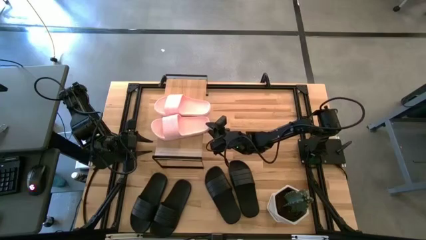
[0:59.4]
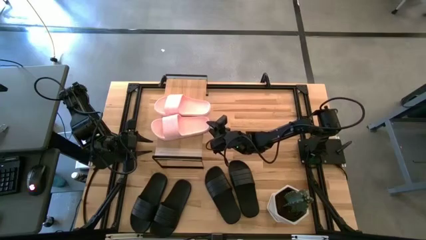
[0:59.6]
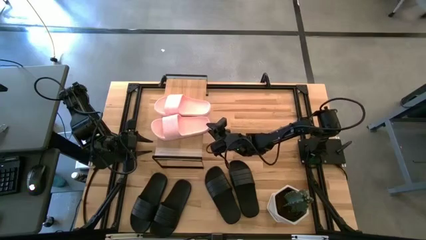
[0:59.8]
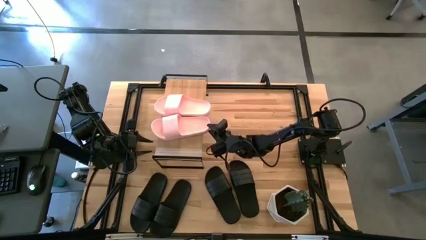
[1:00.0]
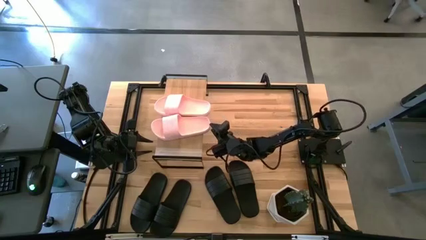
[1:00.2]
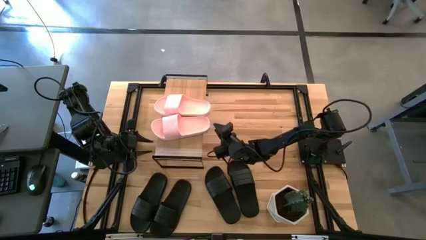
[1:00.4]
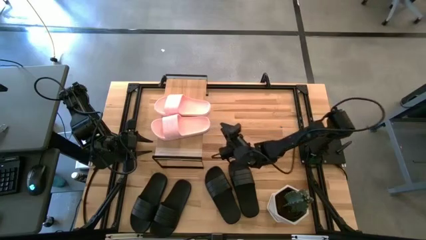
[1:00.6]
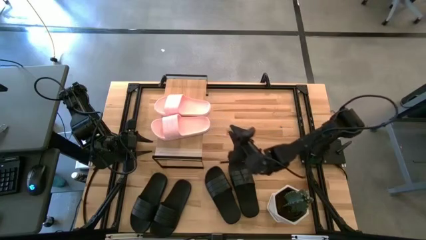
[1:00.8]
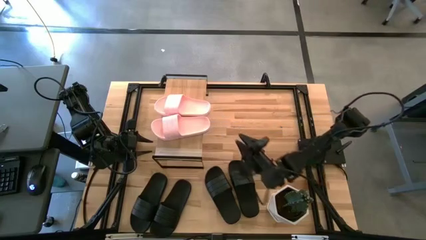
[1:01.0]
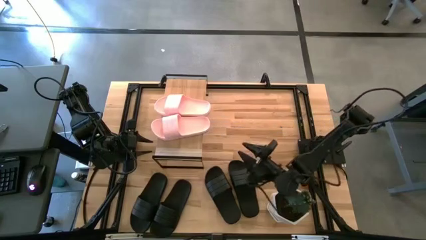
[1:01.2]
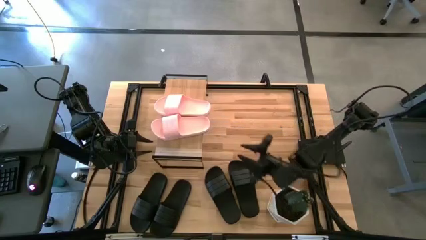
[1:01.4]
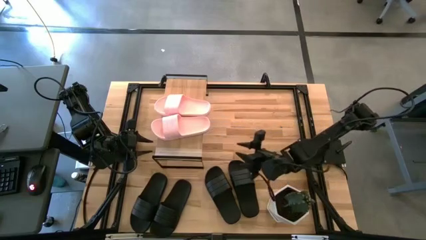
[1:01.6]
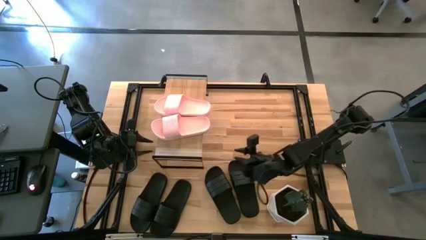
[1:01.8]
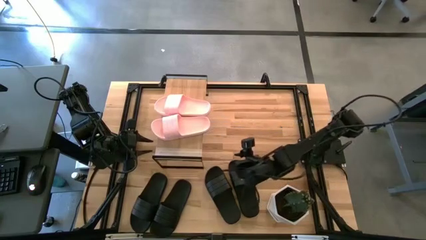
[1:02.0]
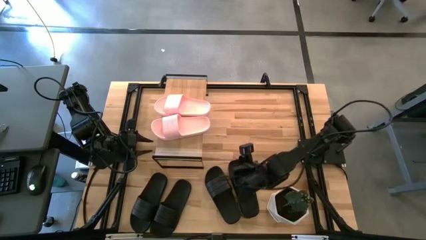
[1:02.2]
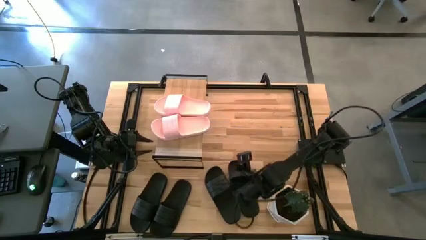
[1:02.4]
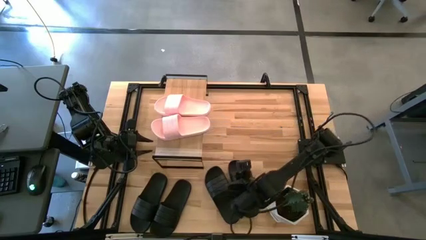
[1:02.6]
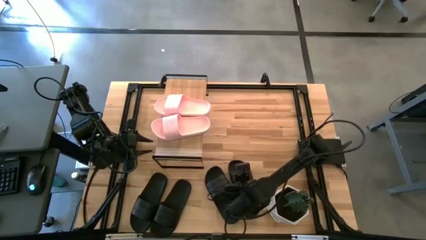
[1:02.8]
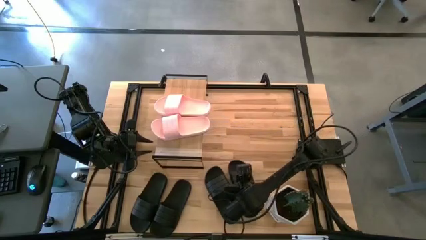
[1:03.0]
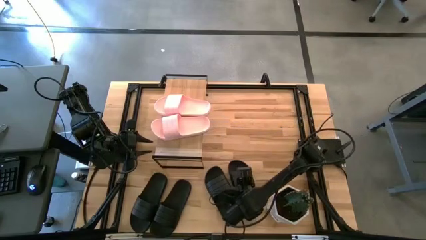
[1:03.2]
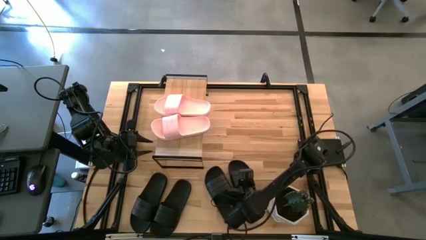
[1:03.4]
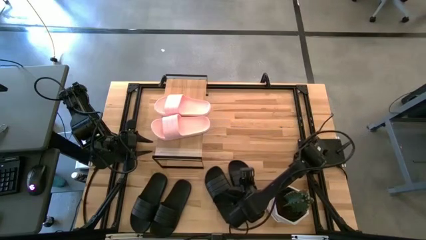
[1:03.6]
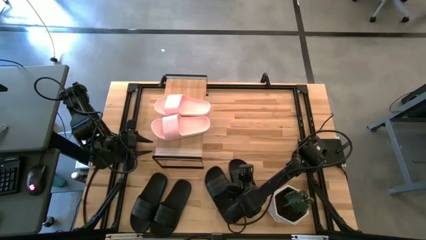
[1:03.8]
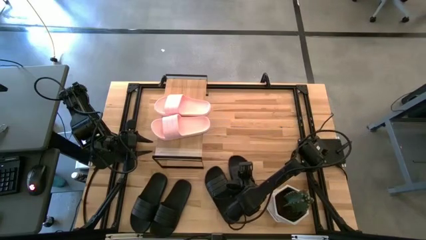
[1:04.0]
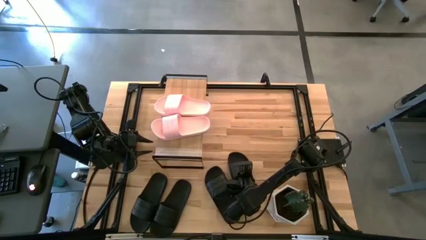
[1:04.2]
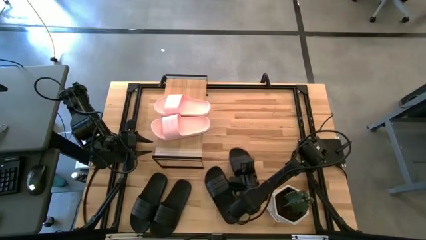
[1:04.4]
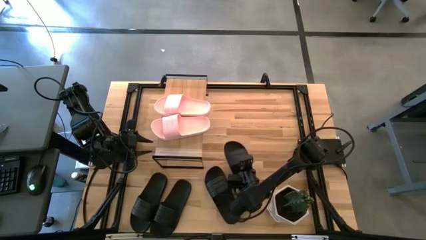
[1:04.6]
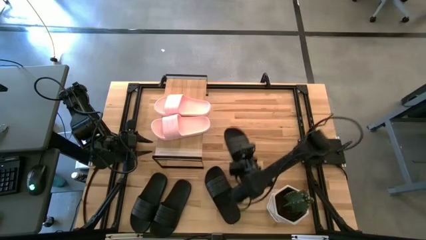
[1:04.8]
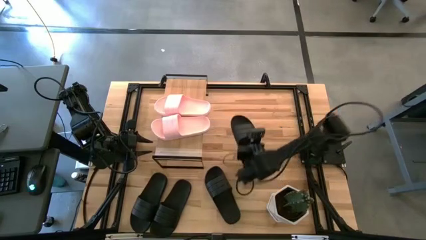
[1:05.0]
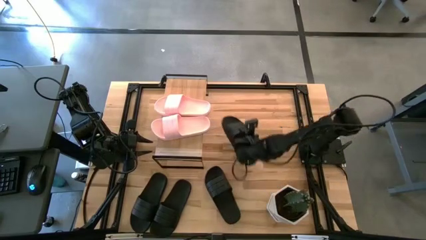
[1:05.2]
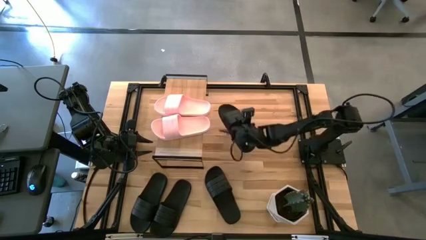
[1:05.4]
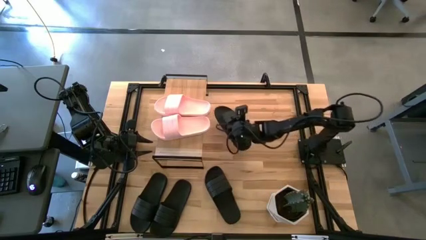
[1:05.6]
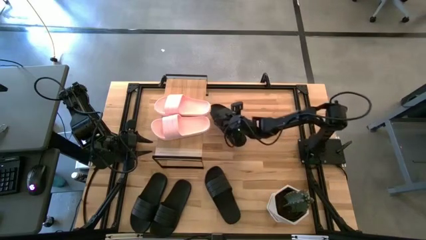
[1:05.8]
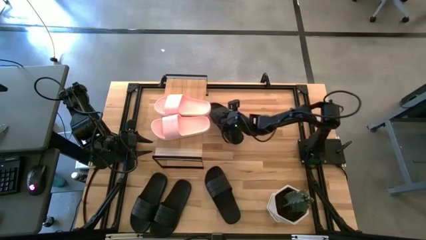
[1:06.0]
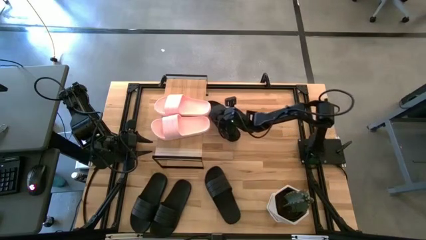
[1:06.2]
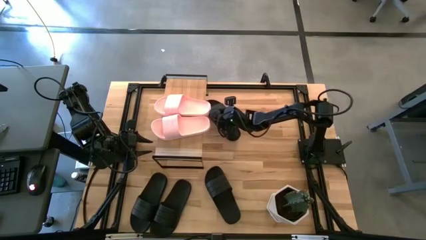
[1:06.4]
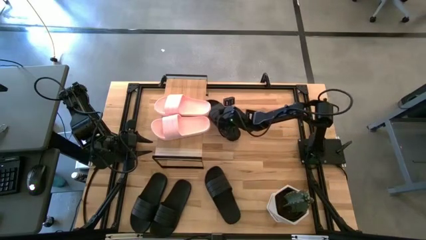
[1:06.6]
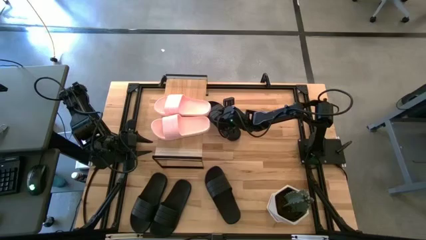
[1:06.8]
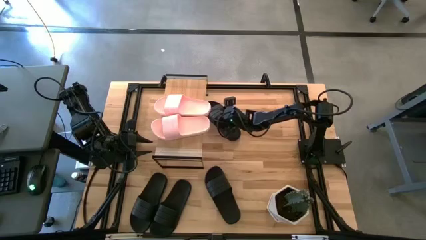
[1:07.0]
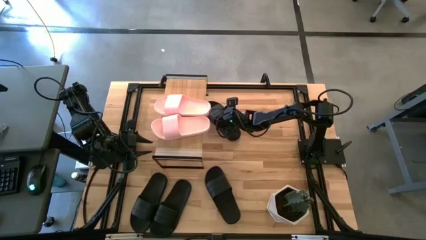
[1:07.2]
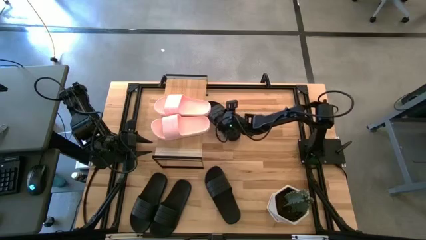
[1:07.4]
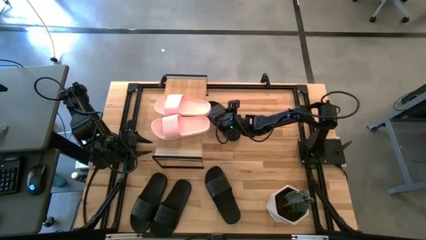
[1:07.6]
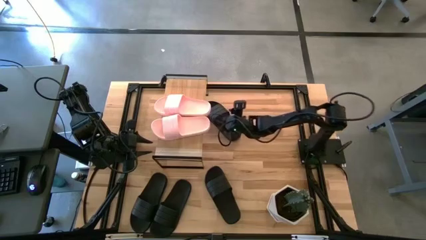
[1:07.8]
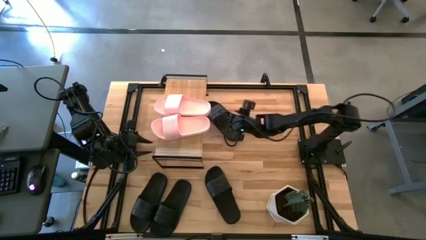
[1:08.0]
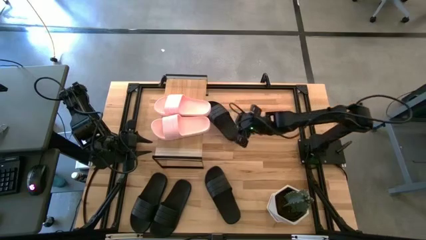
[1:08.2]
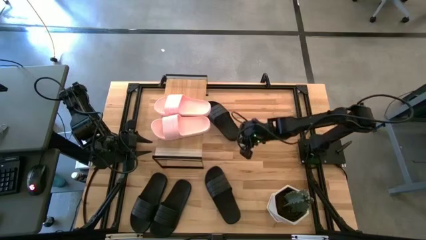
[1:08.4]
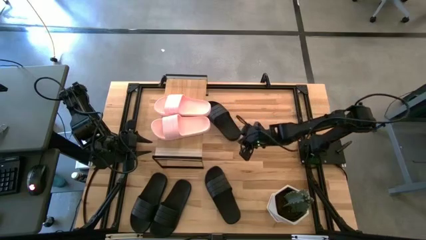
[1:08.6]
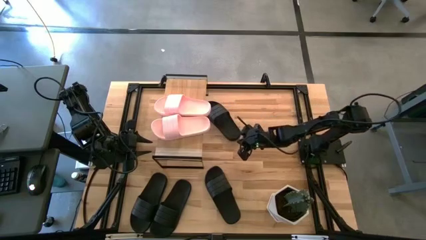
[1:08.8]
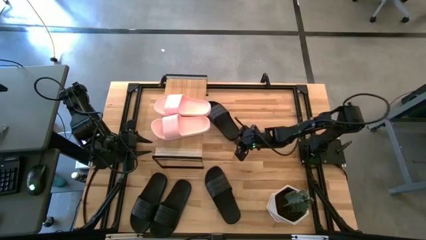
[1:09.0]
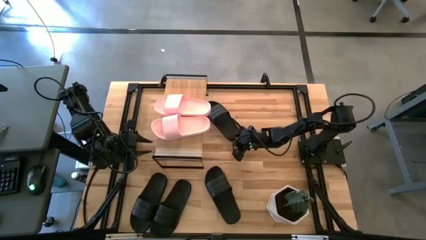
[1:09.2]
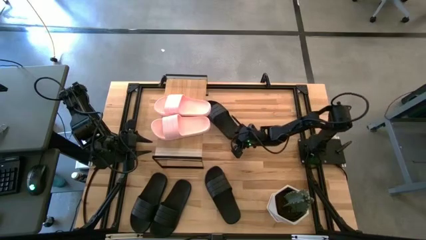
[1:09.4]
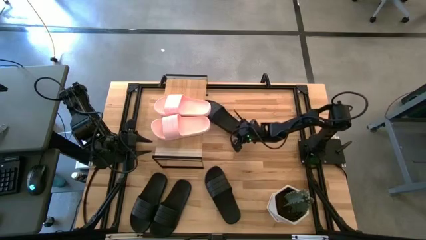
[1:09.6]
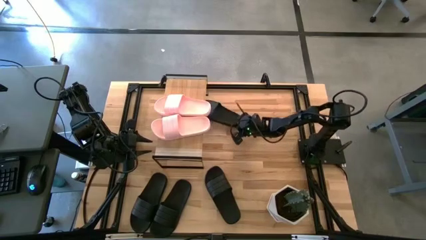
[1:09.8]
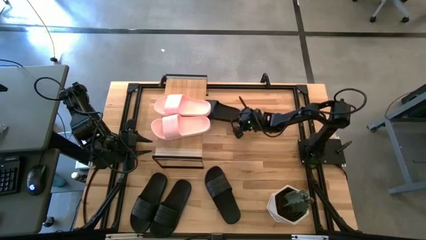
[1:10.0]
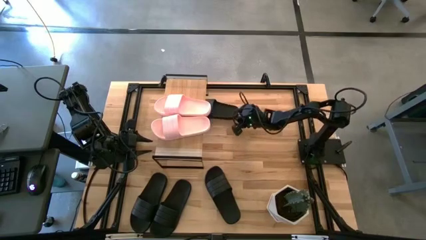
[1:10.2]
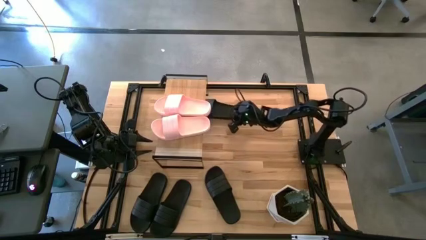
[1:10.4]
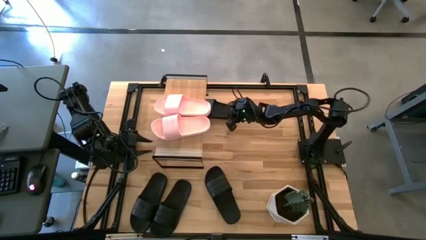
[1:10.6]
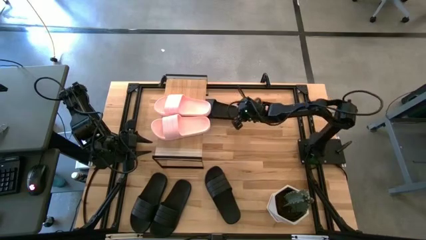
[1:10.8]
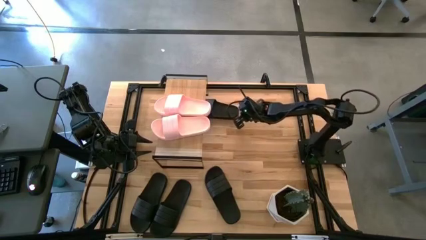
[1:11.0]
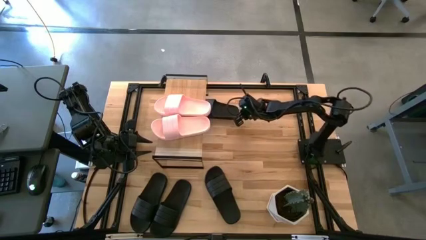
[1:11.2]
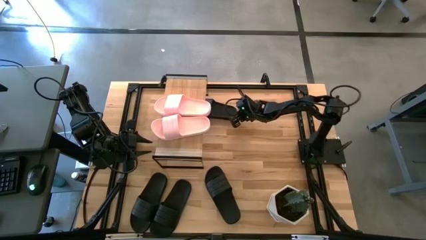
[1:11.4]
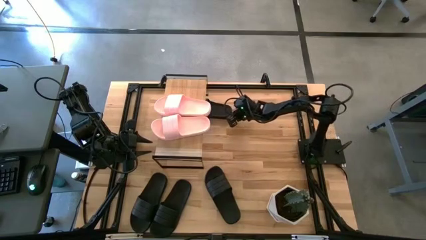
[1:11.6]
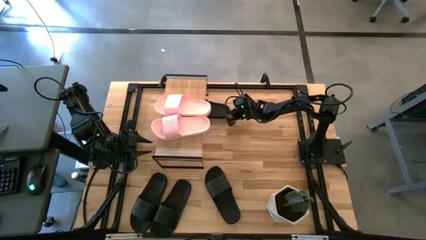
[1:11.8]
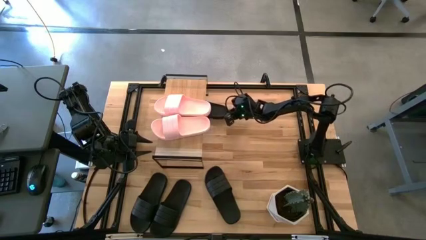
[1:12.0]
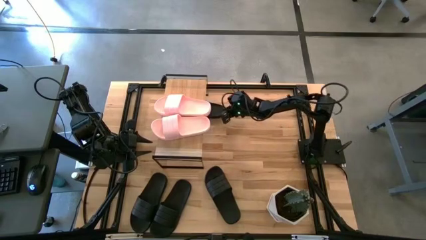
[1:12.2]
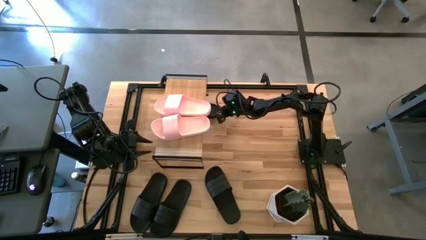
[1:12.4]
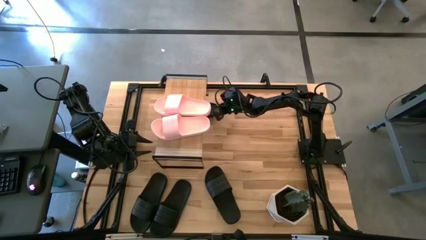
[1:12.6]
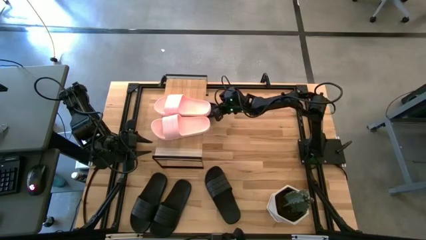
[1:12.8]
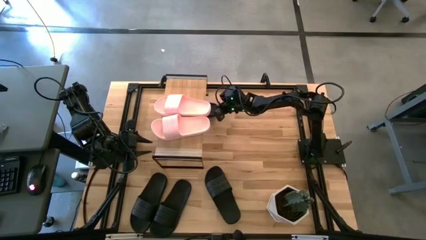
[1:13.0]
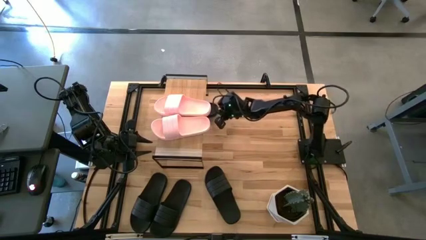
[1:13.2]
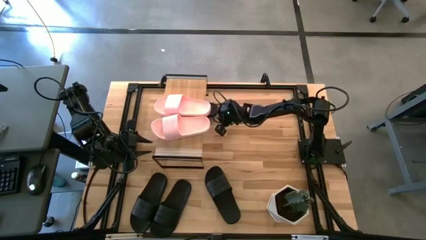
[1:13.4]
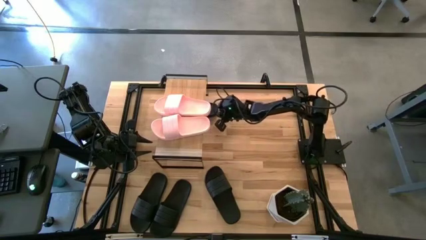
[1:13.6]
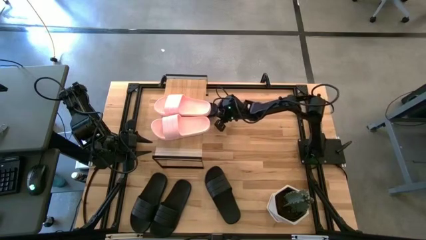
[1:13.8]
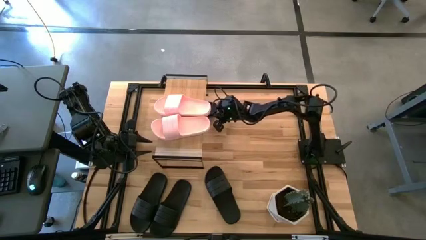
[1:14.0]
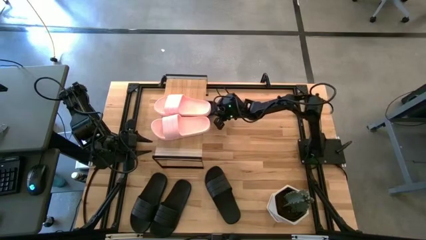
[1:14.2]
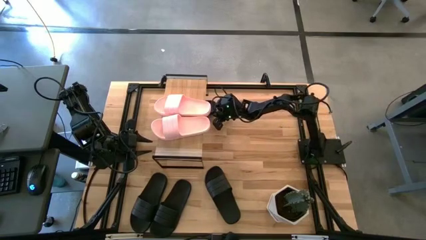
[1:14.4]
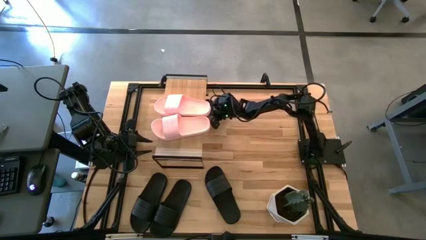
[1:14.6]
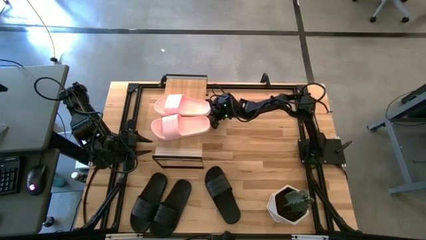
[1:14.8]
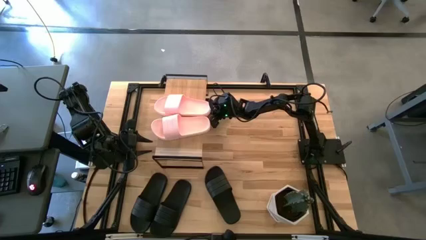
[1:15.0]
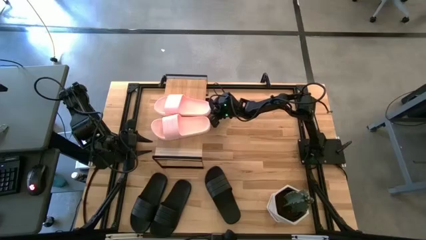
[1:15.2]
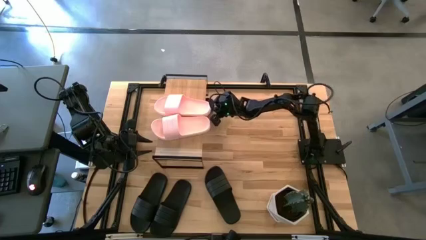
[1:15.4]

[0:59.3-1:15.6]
Task: Pick and place slides into the shelf
Put the black slide under the shelf
